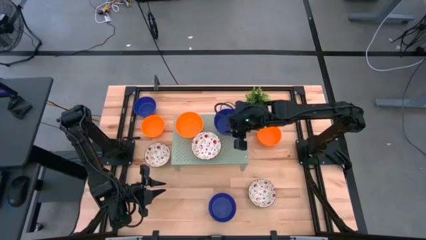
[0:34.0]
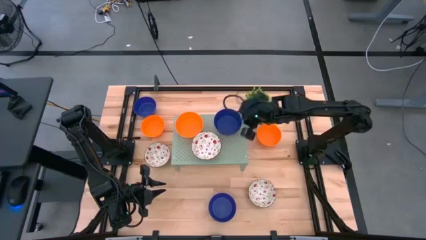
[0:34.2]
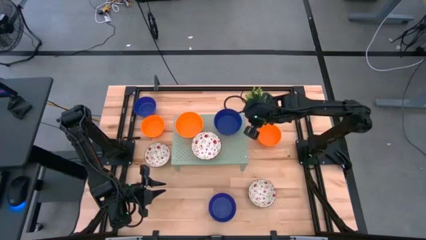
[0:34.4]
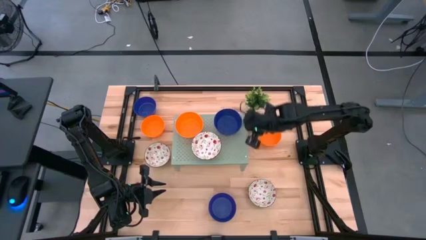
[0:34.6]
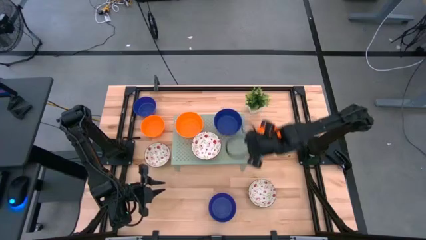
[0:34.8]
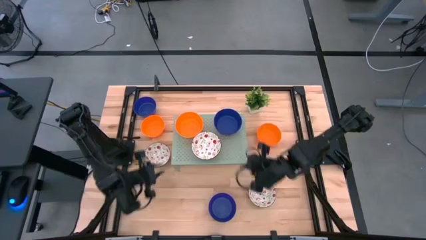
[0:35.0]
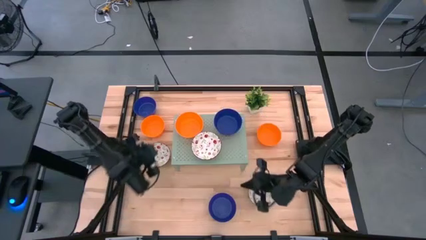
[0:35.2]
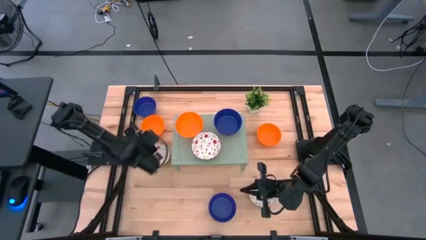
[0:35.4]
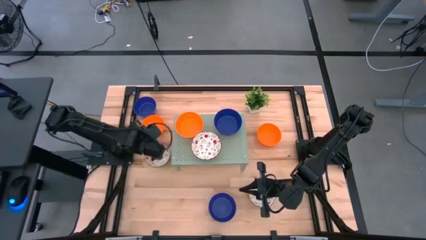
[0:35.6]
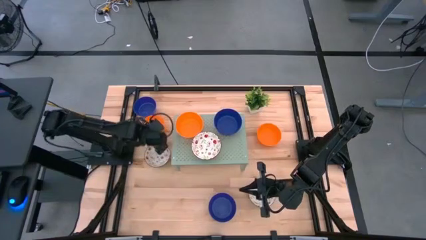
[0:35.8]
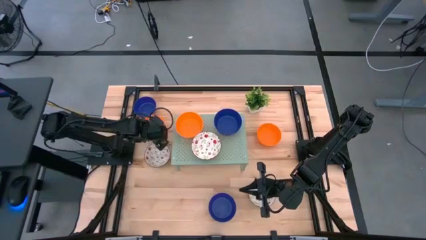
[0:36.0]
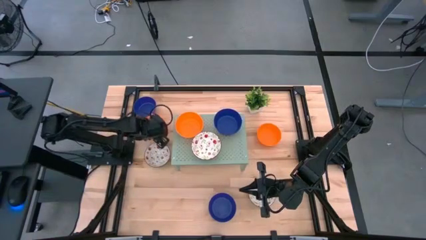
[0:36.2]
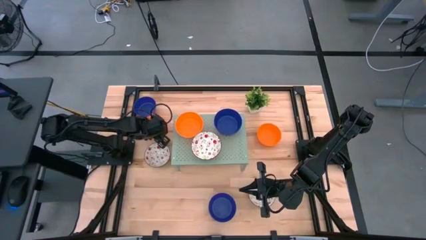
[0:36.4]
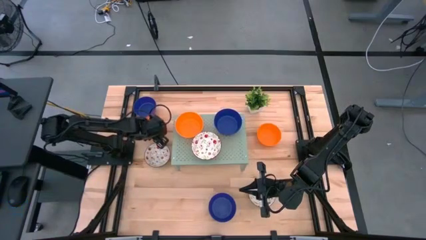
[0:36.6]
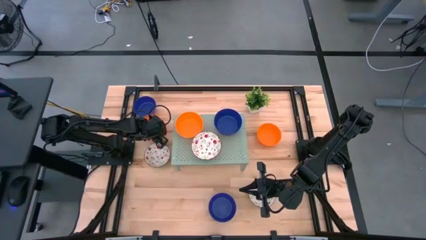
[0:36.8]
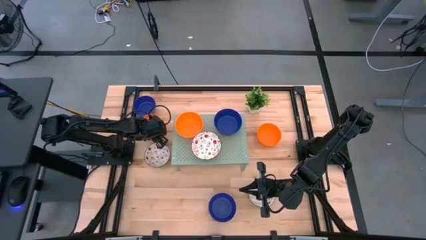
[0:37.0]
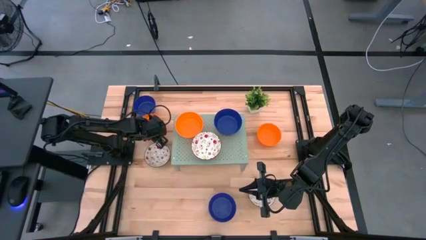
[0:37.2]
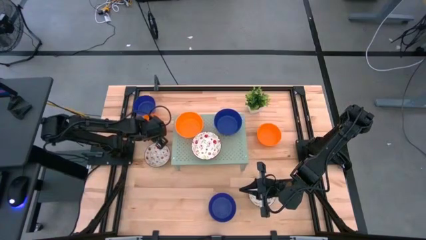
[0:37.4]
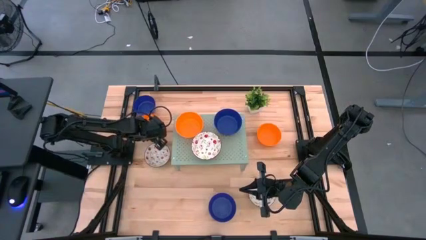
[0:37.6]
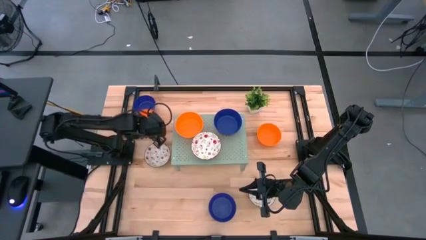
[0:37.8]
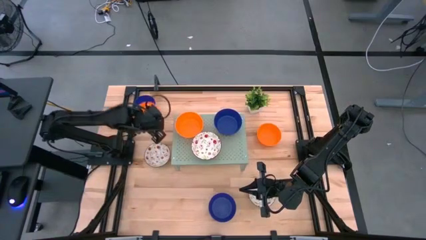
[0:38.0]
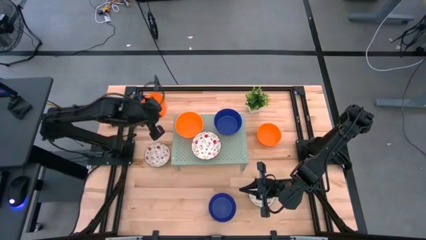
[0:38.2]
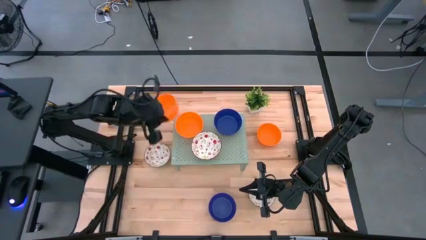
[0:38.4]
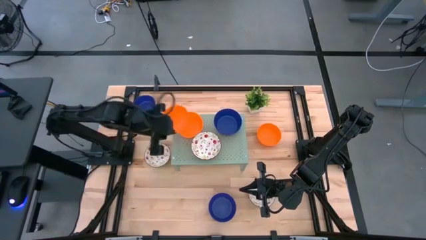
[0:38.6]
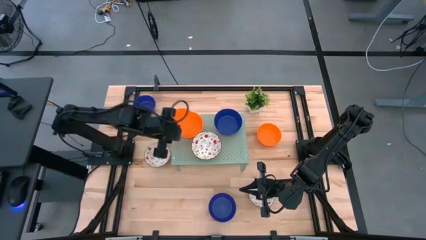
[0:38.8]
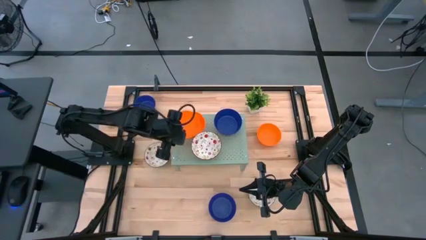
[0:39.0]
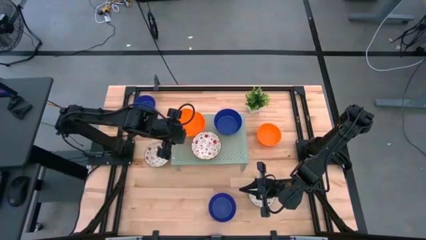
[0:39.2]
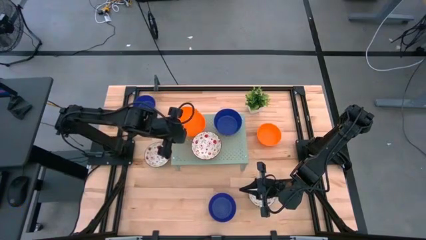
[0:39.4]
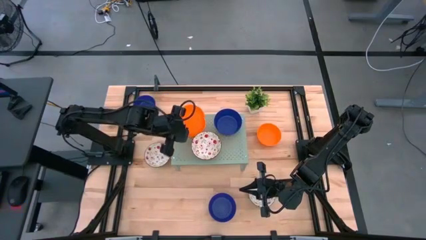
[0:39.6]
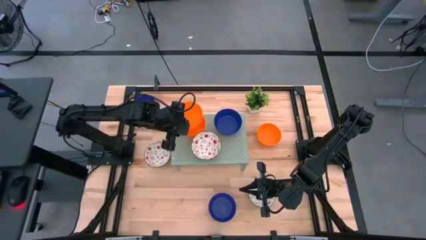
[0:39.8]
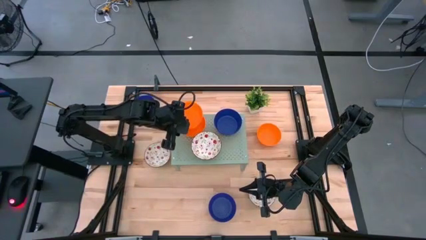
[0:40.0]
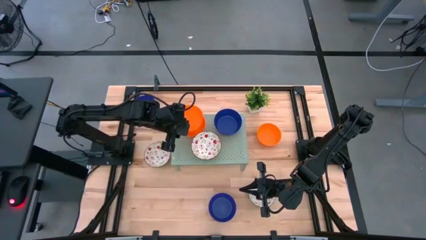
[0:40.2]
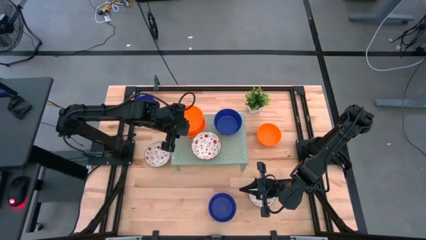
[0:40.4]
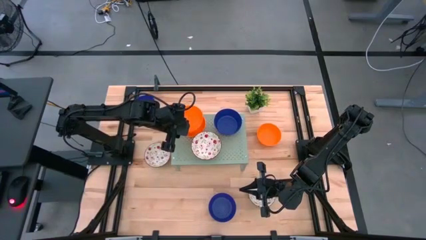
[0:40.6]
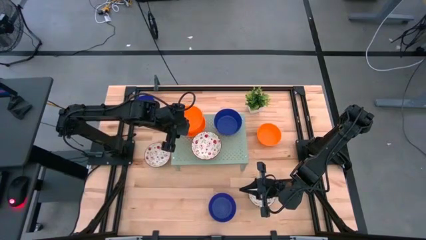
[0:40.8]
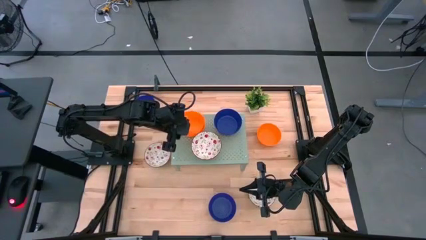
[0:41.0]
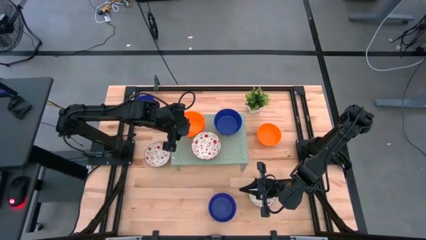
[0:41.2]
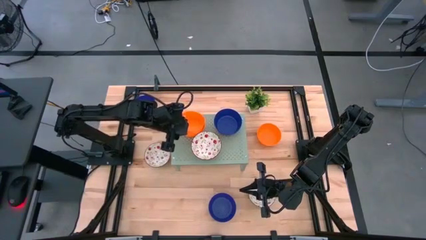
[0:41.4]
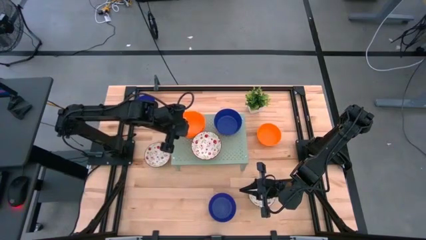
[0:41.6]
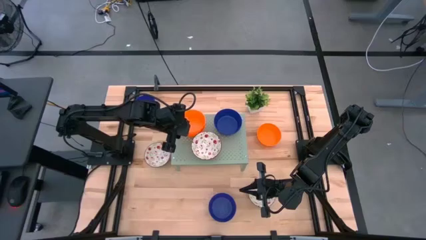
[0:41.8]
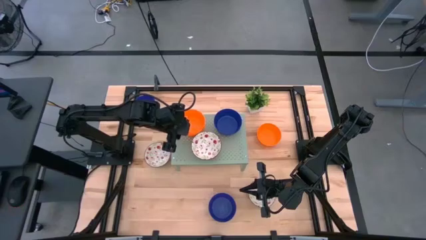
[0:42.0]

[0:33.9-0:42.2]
Task: Pick & Place Mini bowls
Stack the orange bowl on top of the orange bowl on the shelf

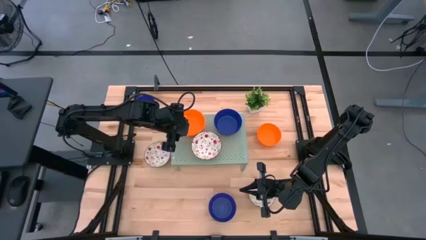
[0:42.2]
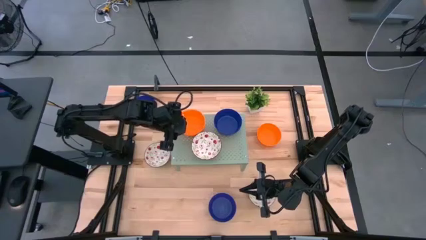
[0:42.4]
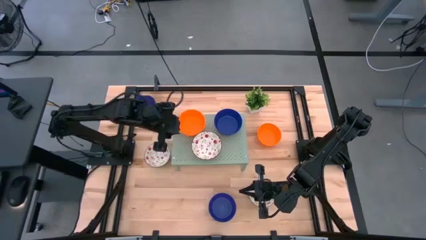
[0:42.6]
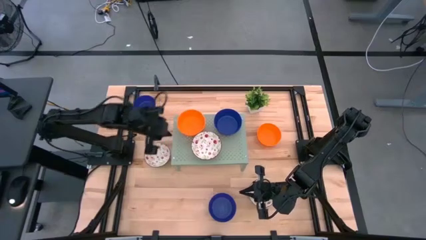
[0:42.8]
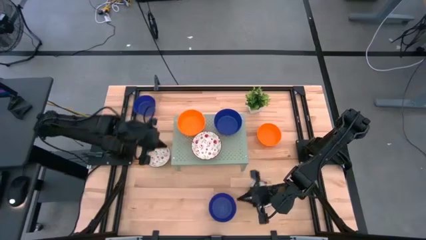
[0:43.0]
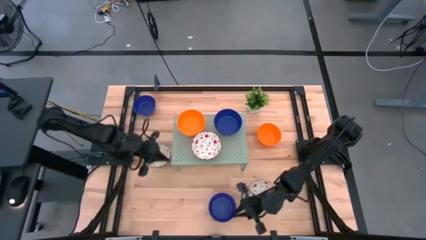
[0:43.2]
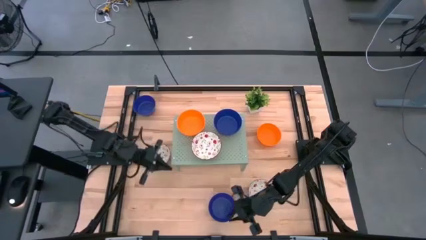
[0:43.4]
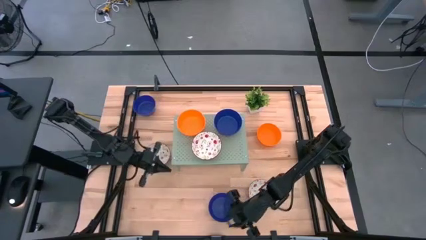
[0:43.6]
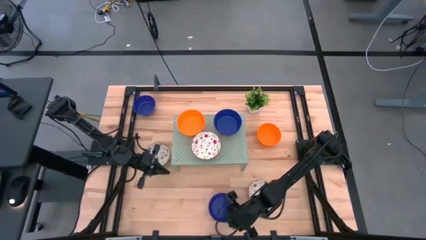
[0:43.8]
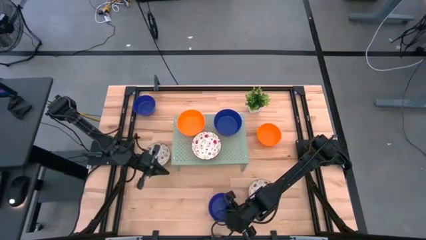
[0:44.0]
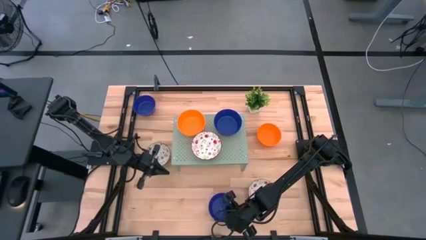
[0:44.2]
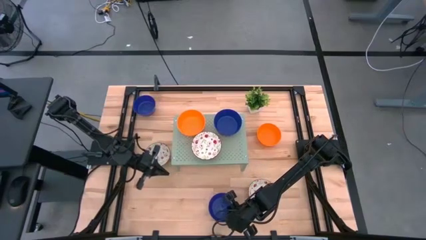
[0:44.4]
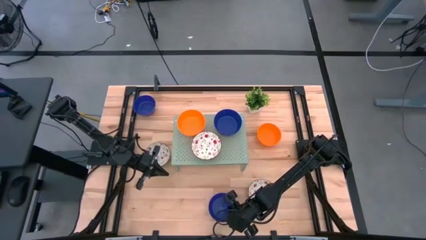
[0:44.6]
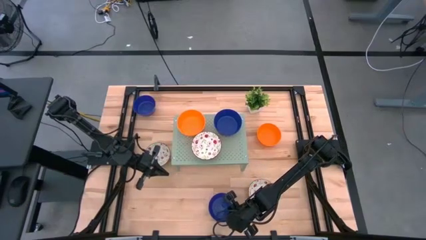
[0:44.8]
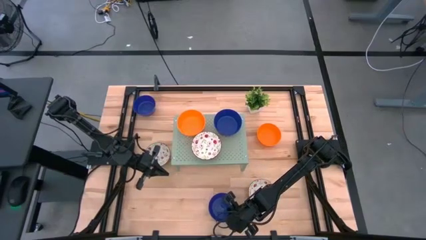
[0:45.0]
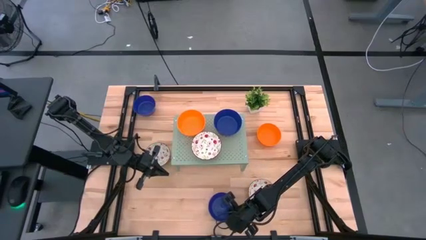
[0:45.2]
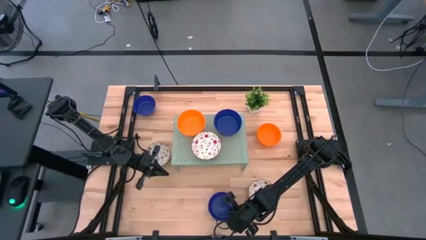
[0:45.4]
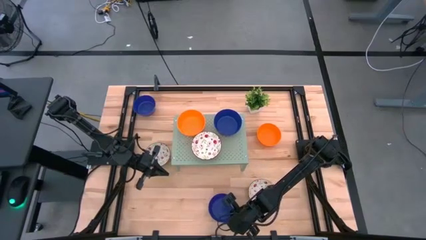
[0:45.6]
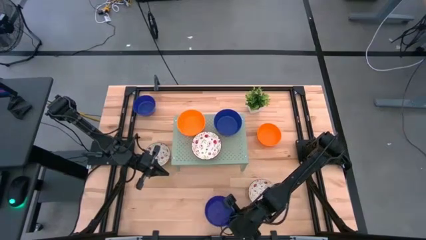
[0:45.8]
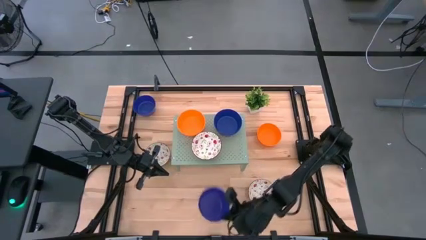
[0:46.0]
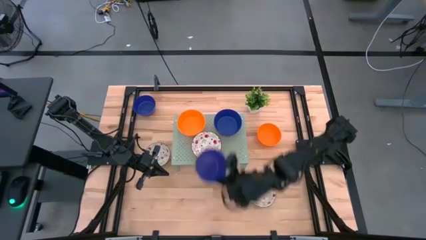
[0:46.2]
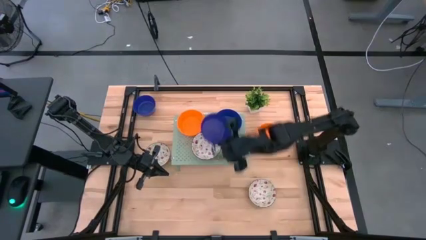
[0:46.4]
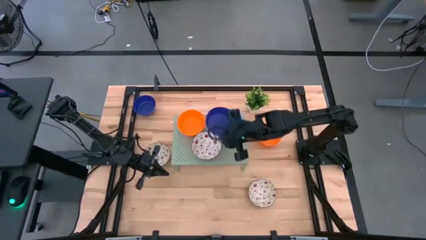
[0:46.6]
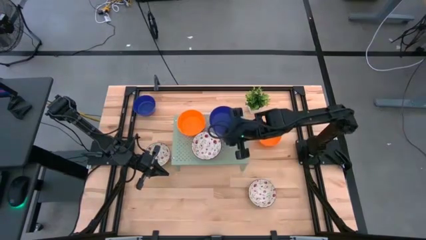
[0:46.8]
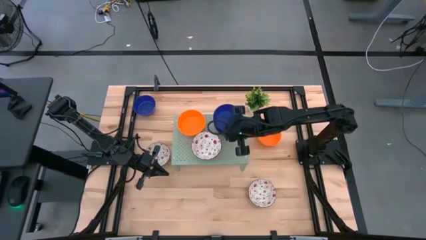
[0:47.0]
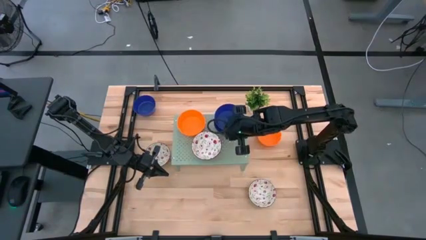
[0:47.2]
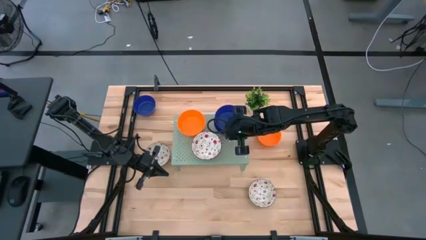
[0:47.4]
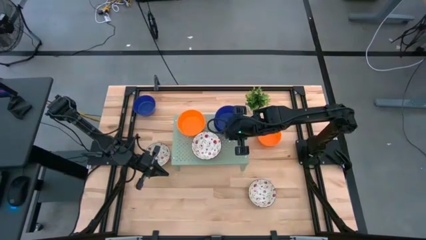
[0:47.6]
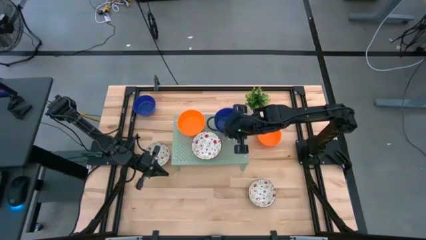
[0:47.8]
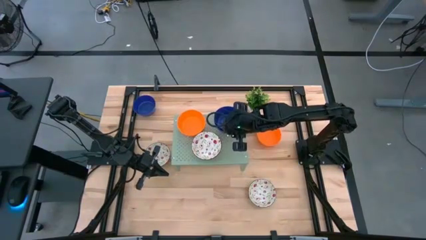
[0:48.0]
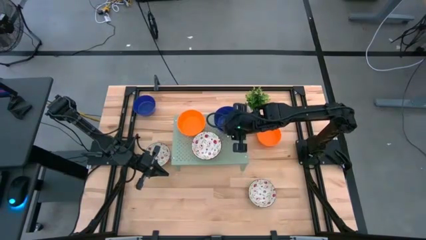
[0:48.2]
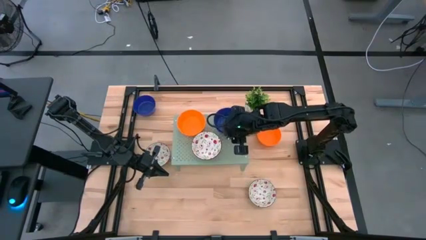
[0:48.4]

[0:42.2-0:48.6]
Stack the blue bowl on top of the blue bowl on the shelf

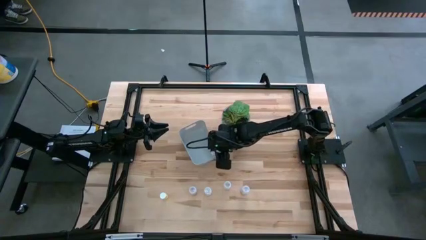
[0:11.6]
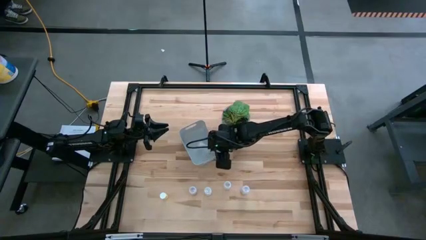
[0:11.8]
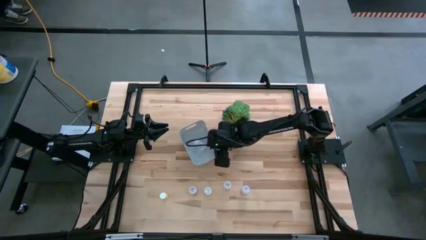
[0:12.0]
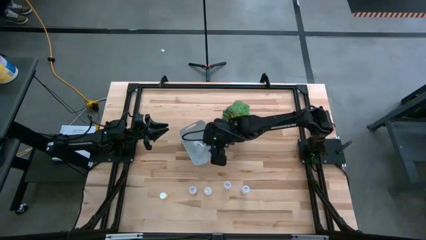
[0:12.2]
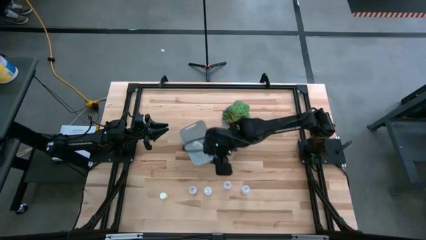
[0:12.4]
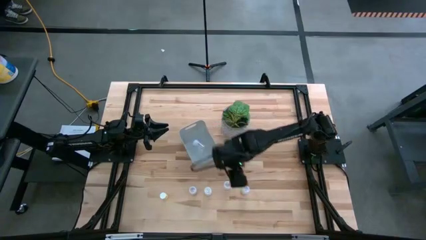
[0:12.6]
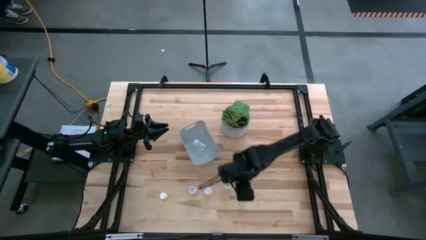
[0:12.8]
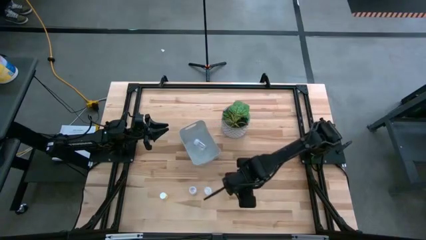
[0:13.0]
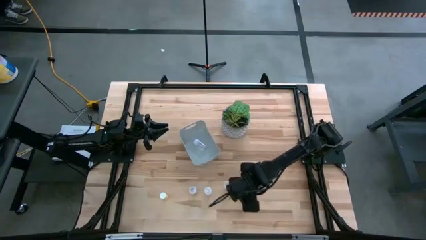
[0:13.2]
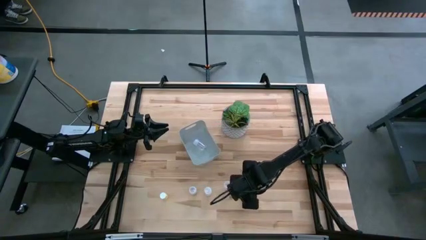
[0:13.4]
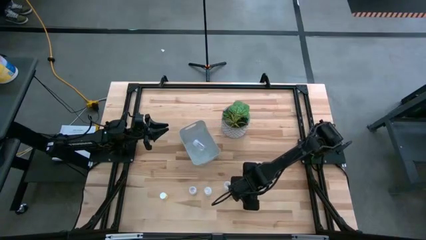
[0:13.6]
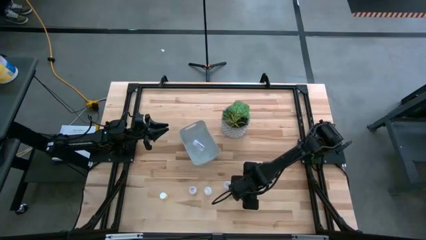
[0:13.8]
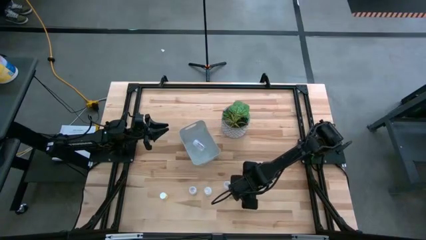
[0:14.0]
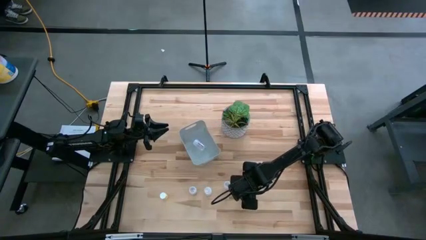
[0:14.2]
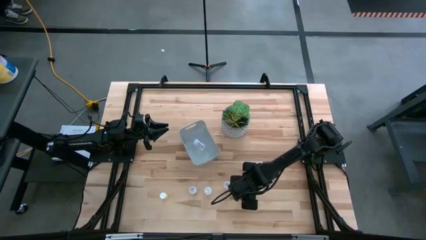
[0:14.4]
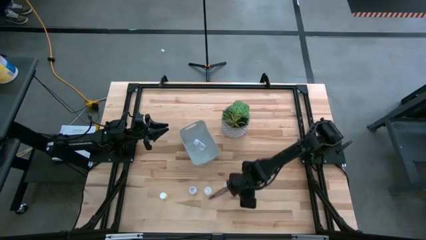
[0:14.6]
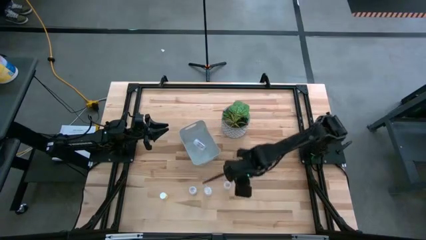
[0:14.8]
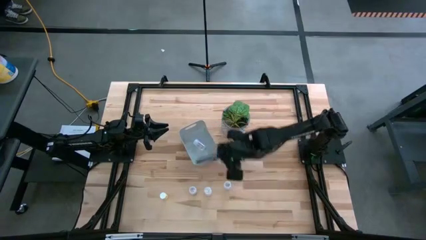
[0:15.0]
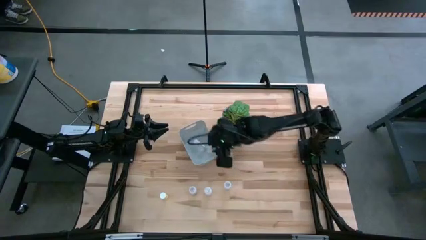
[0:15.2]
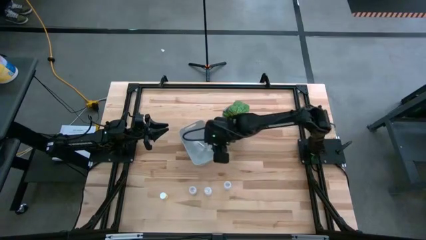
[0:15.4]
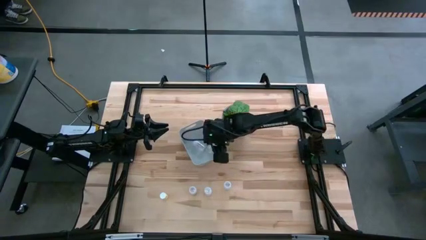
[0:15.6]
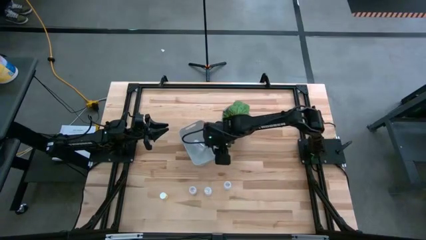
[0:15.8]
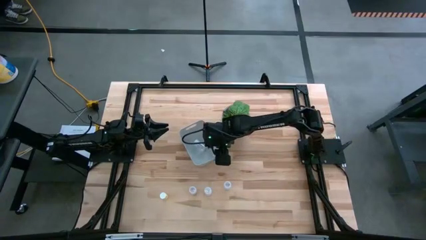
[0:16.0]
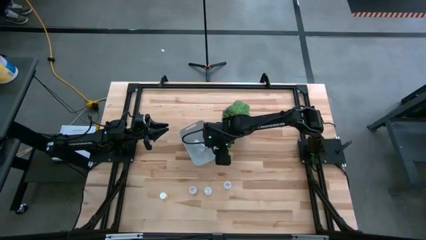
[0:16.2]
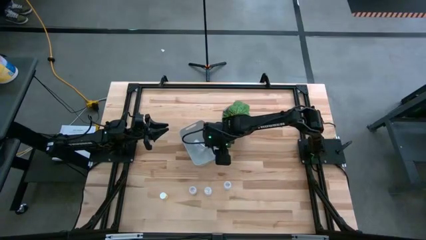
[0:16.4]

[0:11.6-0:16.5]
Task: Pick and place pill bottles into a basket
Put the transparent pill bottle into the white bin
